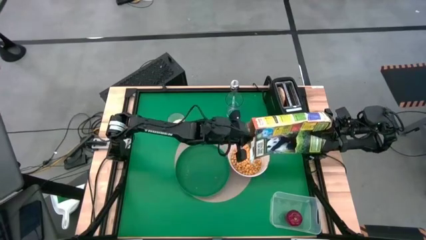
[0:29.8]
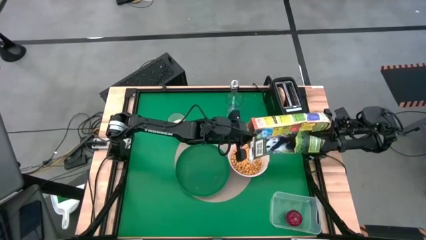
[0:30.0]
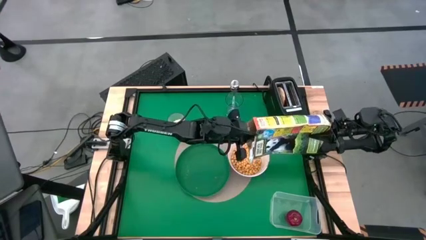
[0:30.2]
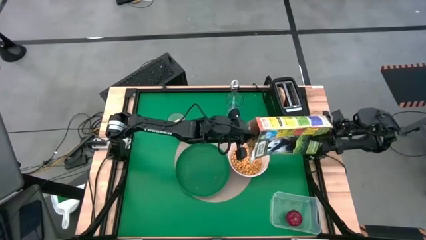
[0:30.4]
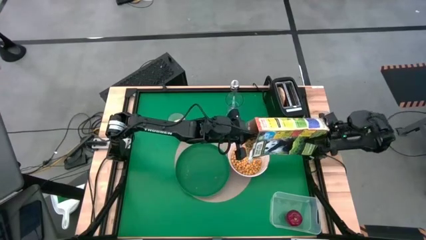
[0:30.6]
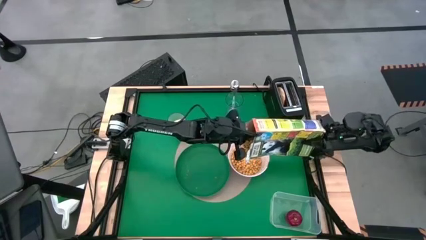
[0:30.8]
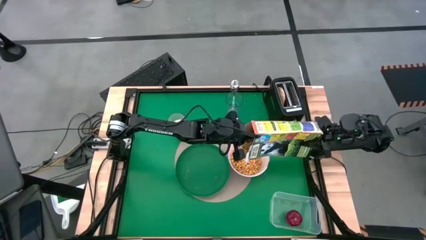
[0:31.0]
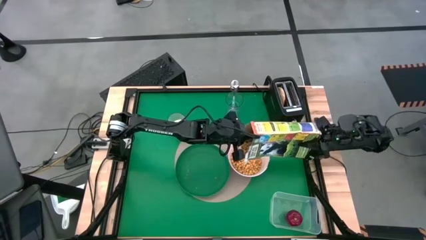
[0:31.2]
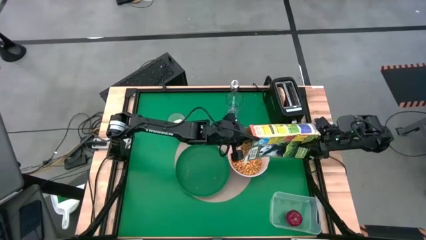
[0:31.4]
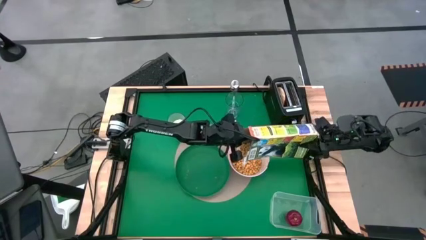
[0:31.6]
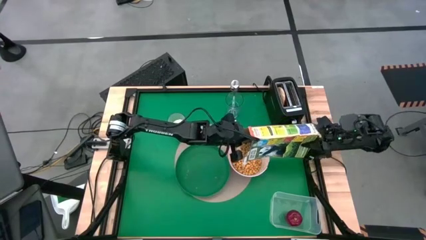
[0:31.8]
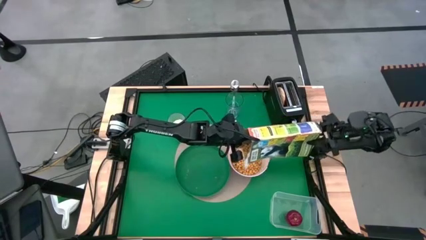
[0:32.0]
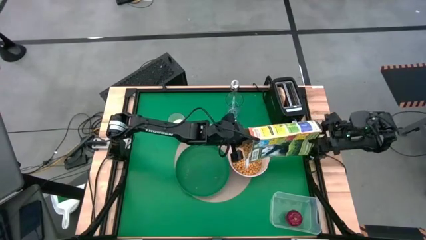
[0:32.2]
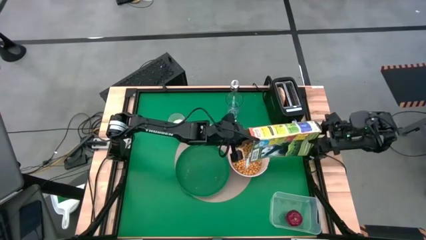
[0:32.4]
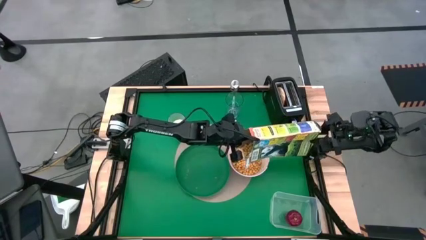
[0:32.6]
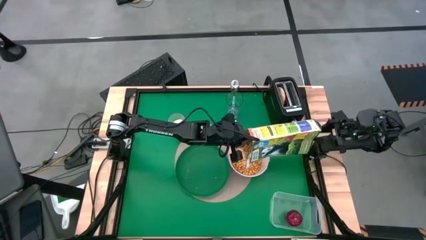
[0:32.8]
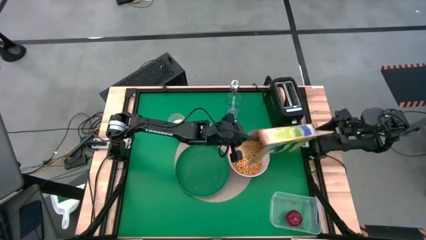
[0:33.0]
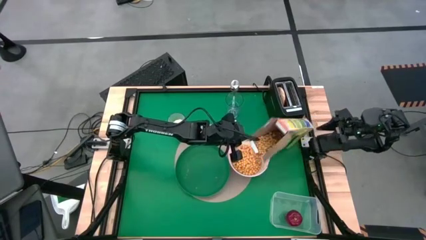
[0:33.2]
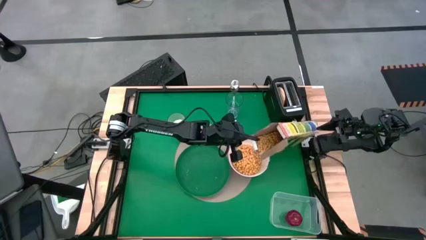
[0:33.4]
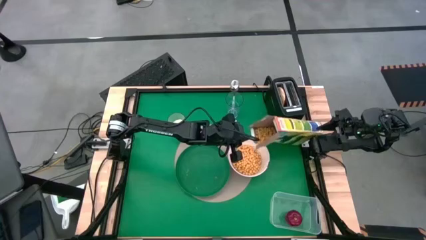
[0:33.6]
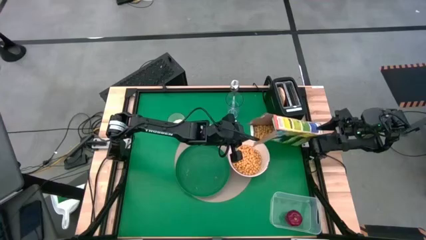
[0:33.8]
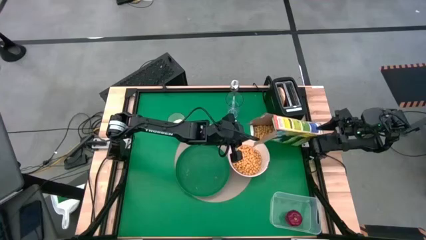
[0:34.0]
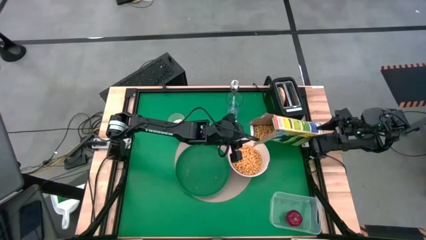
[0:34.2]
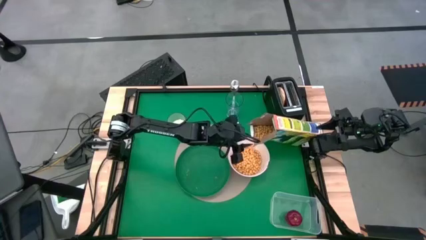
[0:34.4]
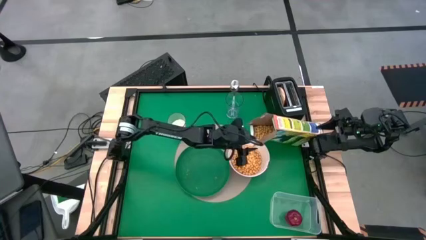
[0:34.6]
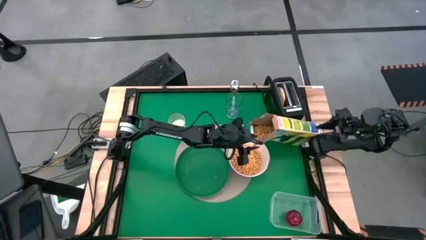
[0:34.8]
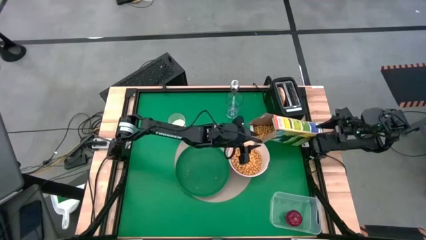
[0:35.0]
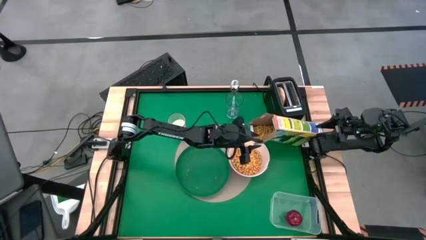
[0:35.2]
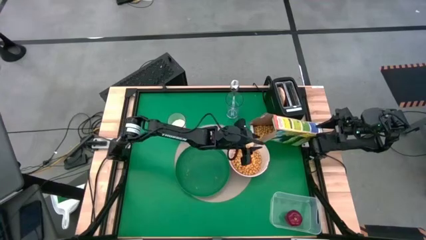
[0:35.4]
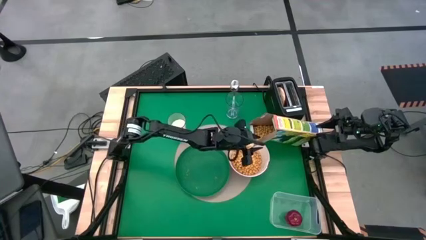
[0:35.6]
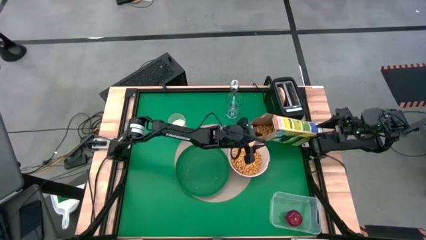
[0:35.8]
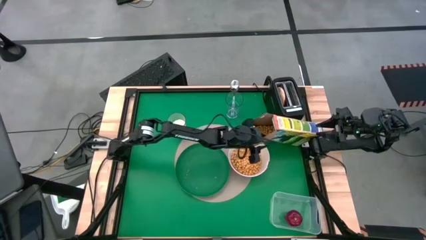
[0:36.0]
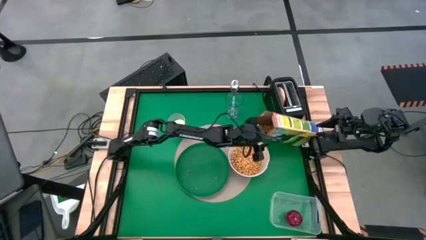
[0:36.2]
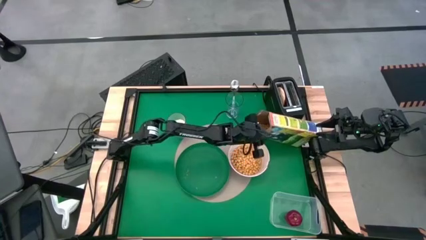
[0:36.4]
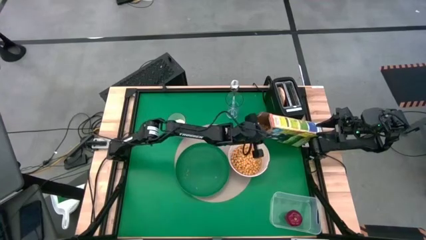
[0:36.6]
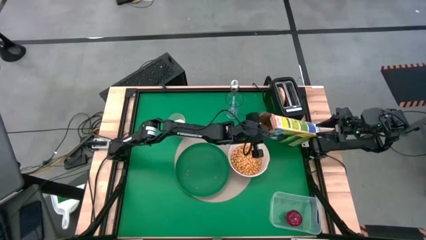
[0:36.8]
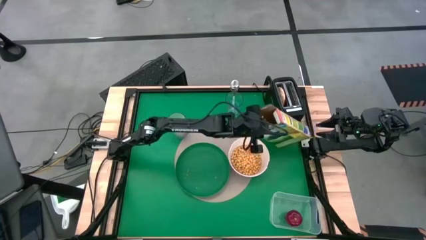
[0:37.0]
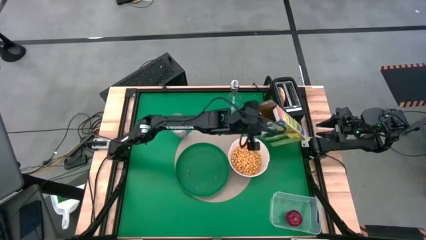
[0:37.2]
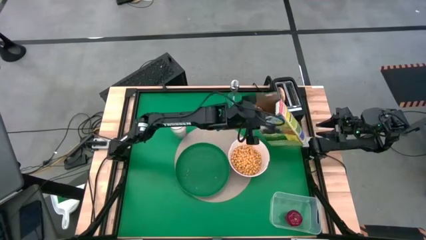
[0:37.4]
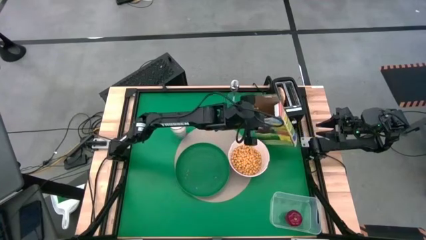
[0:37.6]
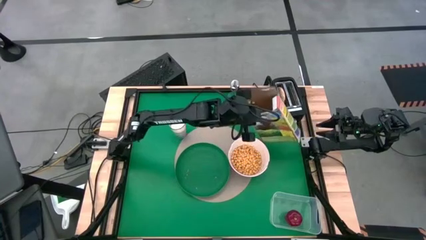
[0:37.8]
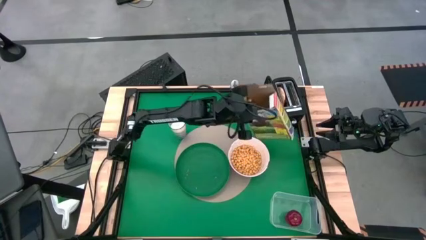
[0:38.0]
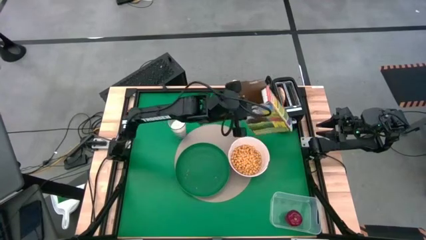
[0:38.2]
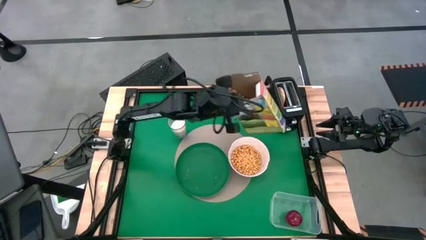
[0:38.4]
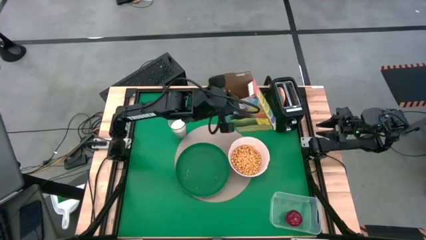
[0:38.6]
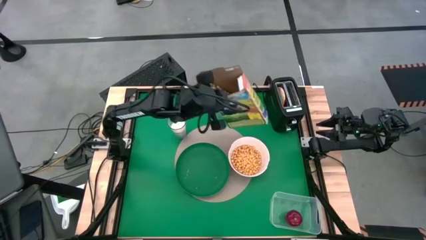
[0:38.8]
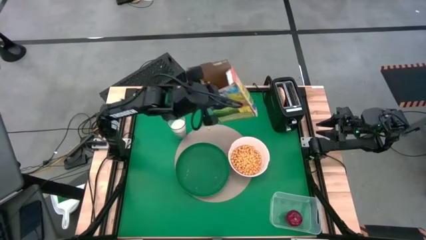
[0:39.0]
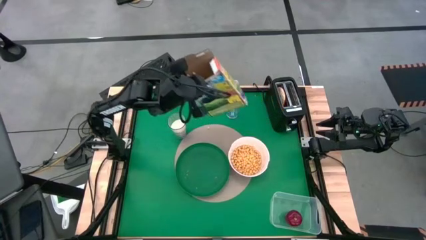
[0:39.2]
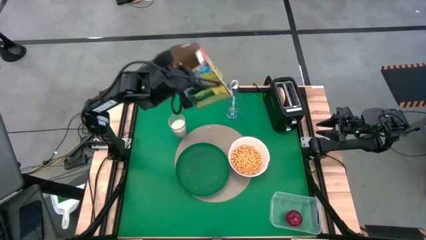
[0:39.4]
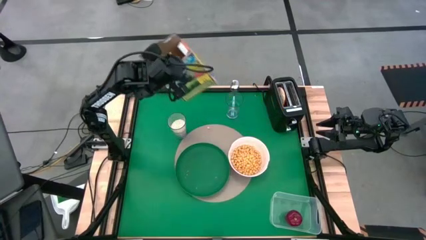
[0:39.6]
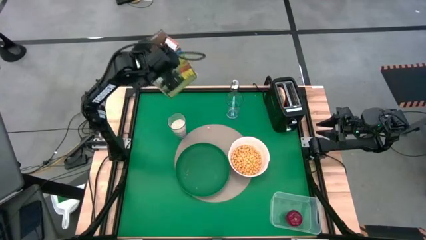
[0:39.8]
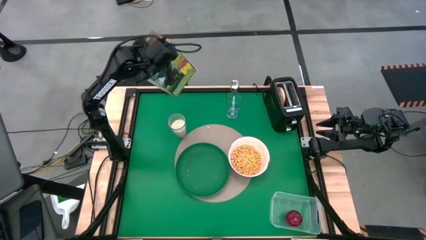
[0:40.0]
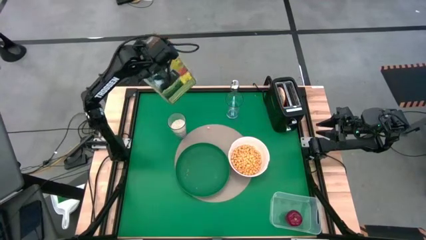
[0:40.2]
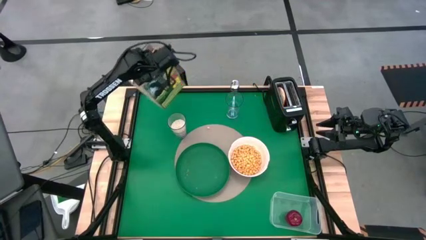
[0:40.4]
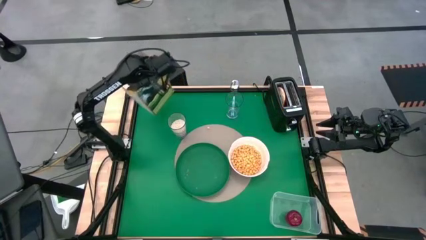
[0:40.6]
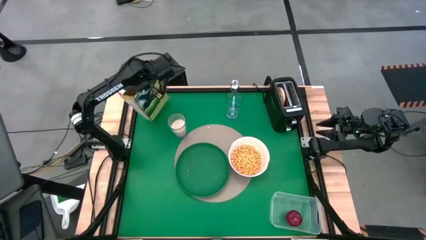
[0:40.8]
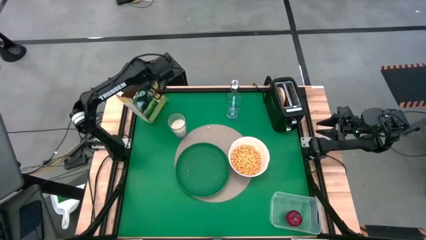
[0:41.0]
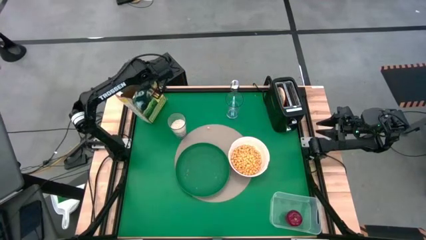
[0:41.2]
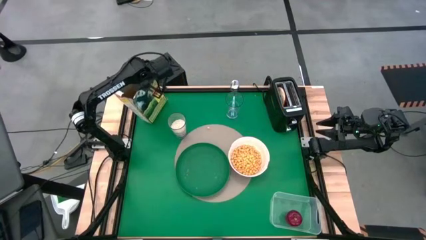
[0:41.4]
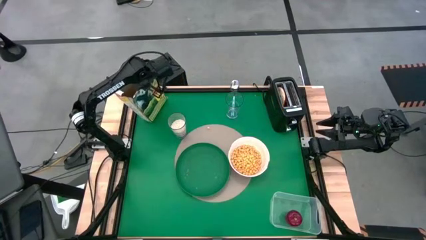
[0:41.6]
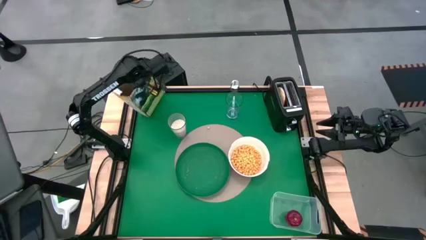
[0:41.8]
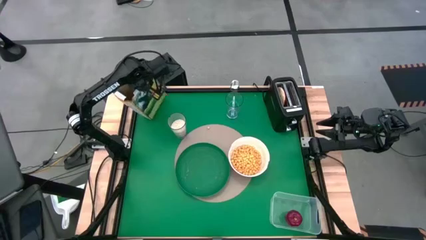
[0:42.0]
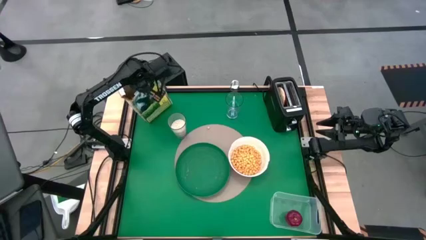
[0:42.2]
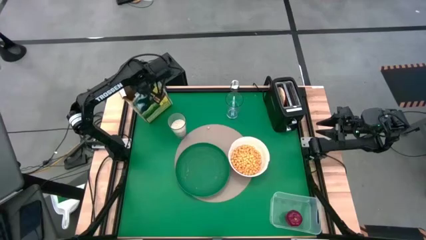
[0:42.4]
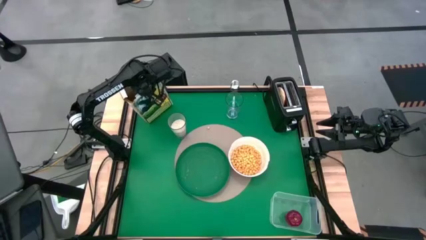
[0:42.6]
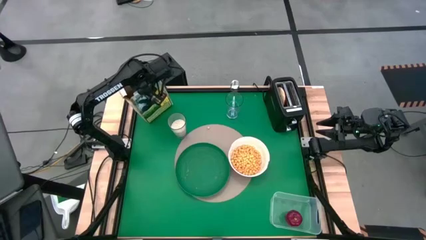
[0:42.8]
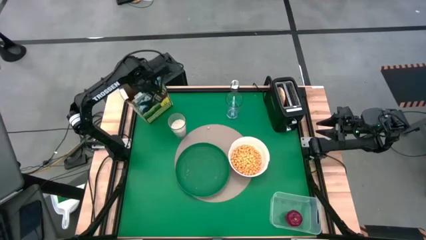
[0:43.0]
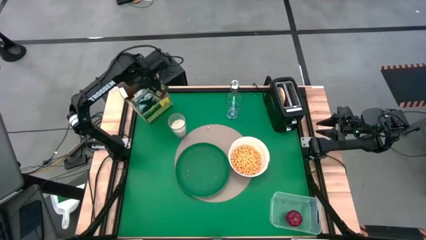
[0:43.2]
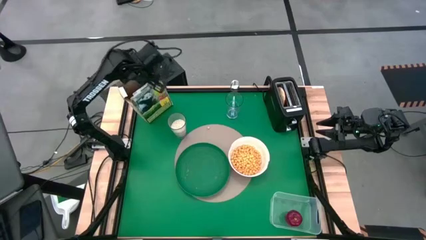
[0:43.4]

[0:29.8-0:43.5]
Task: Arrange a breakfast setting
Pour the cereal into the white bowl
